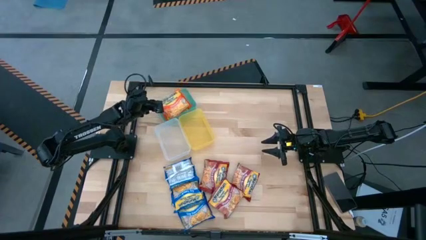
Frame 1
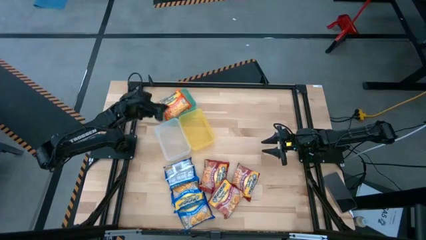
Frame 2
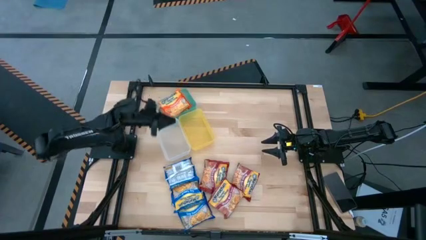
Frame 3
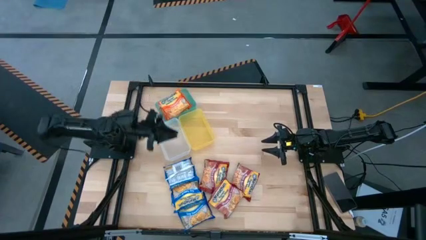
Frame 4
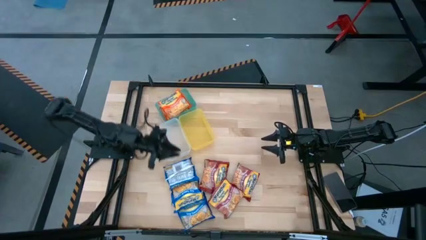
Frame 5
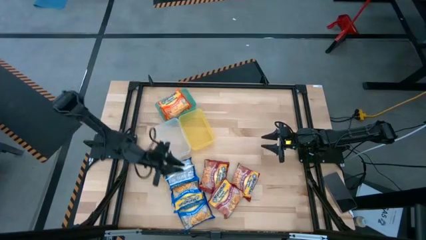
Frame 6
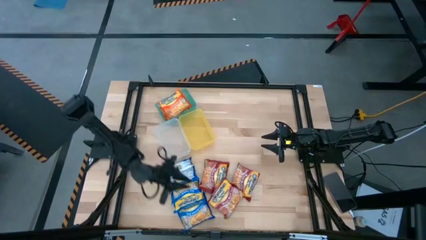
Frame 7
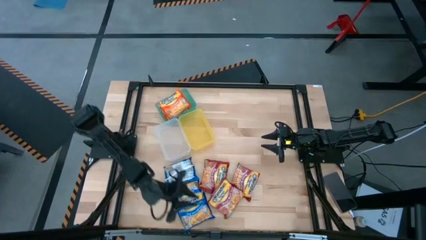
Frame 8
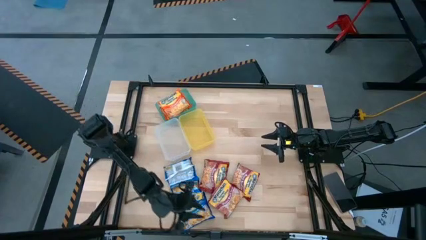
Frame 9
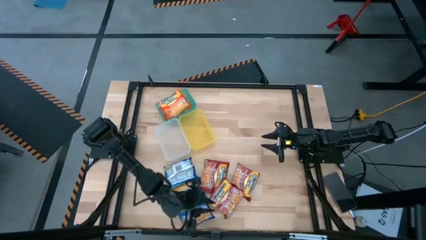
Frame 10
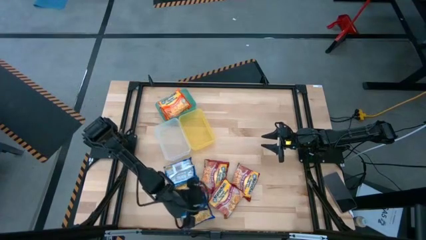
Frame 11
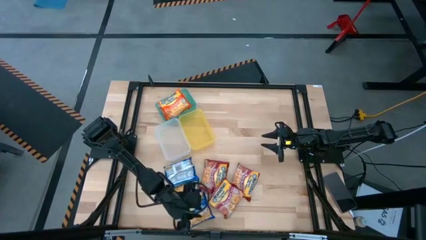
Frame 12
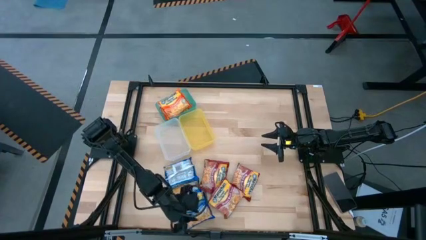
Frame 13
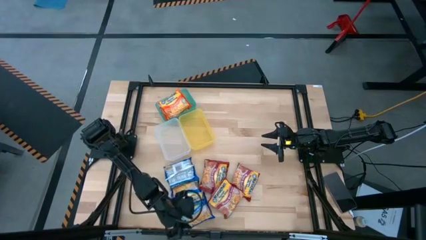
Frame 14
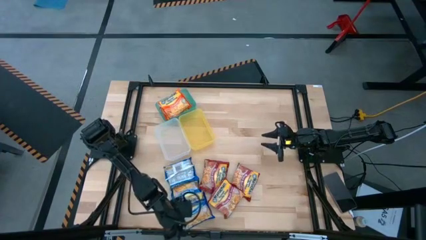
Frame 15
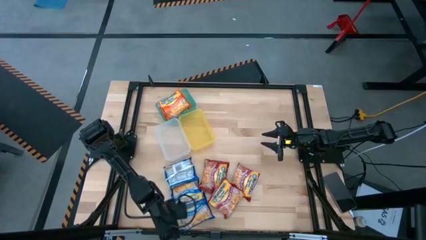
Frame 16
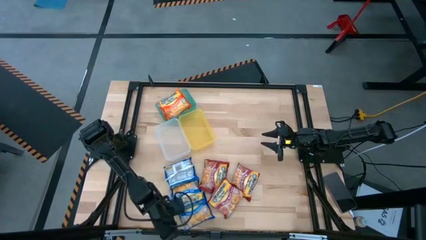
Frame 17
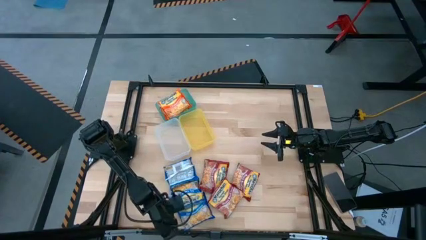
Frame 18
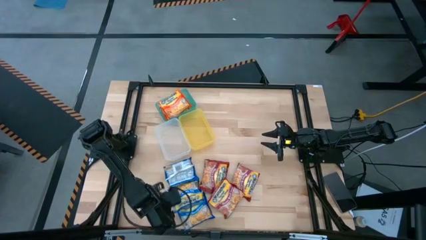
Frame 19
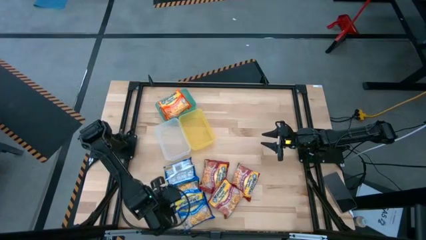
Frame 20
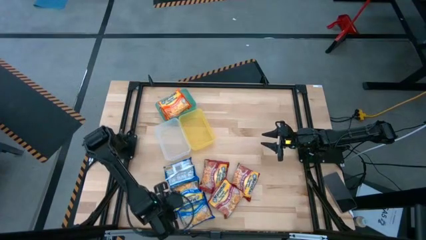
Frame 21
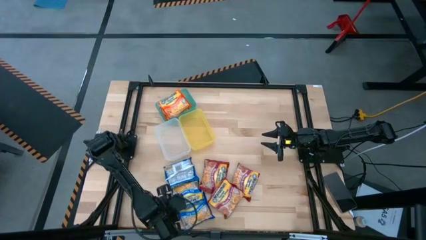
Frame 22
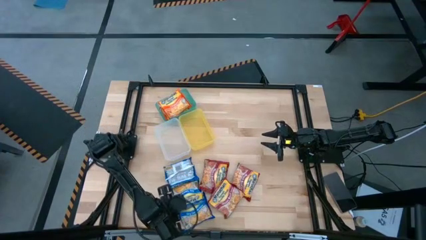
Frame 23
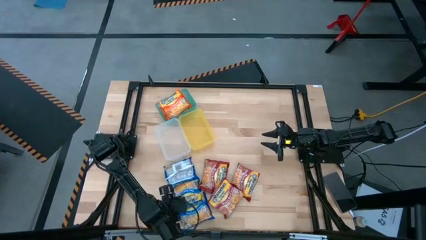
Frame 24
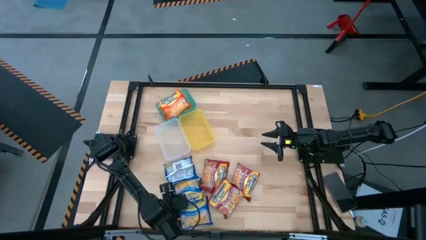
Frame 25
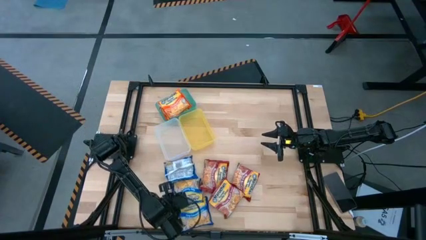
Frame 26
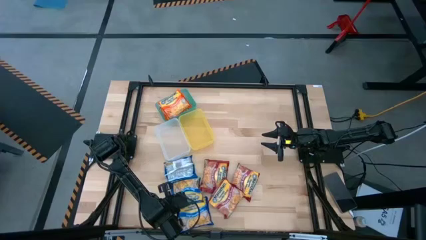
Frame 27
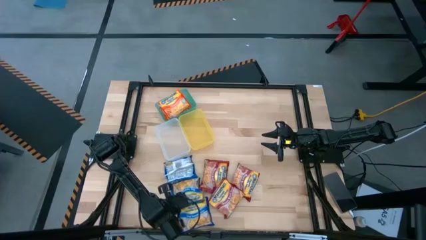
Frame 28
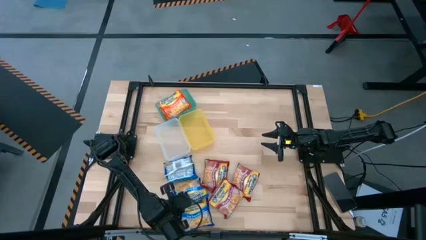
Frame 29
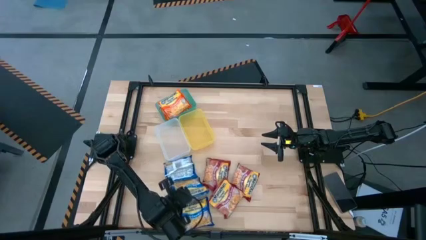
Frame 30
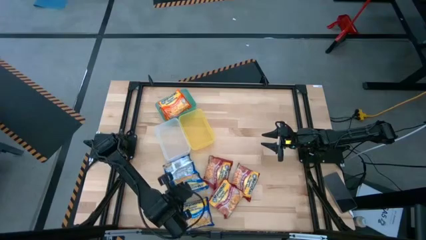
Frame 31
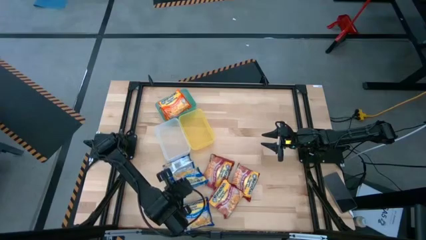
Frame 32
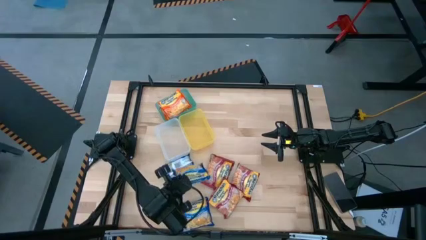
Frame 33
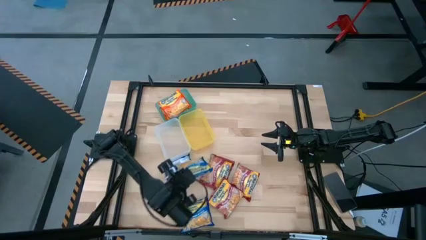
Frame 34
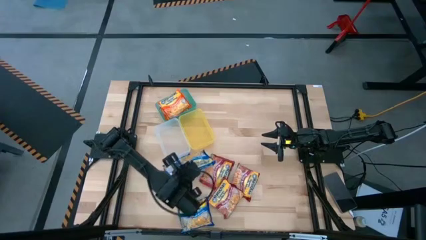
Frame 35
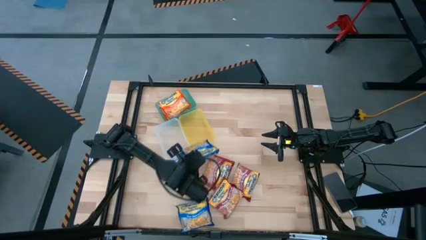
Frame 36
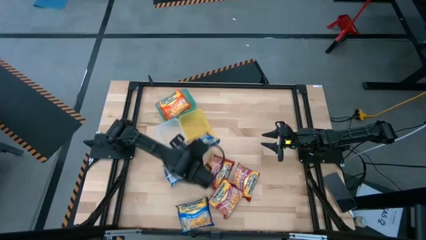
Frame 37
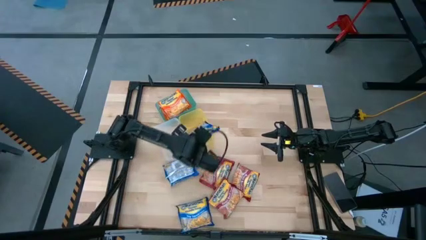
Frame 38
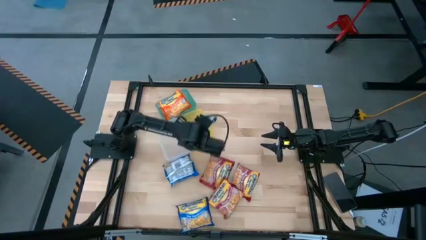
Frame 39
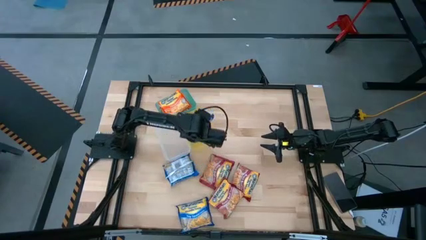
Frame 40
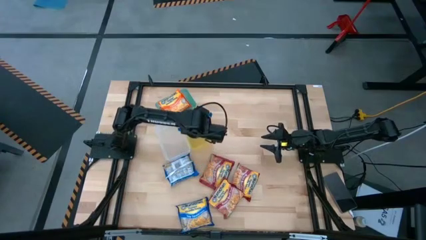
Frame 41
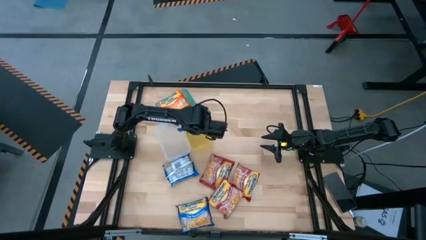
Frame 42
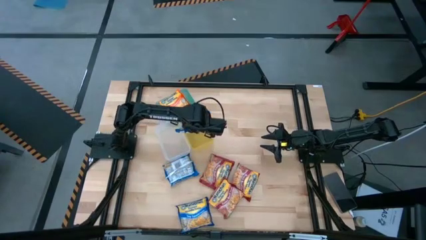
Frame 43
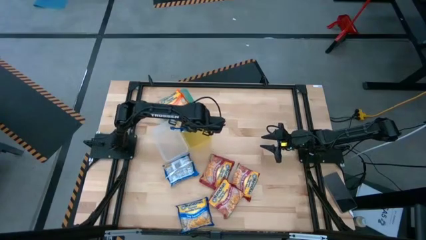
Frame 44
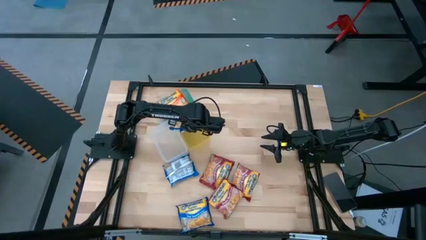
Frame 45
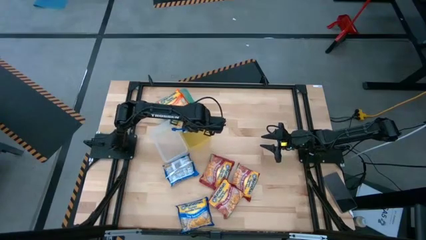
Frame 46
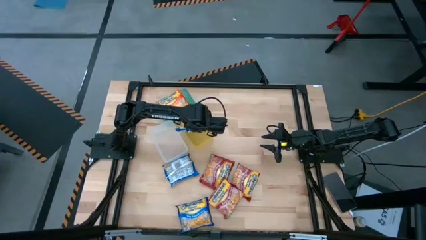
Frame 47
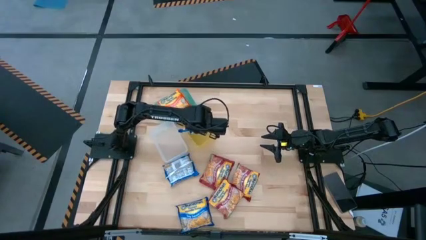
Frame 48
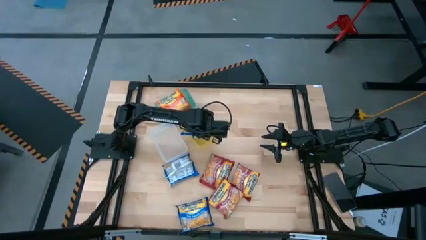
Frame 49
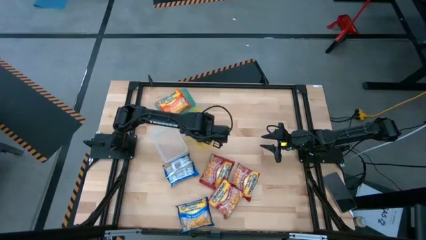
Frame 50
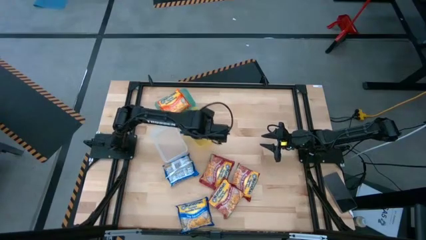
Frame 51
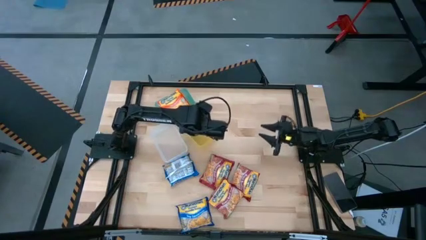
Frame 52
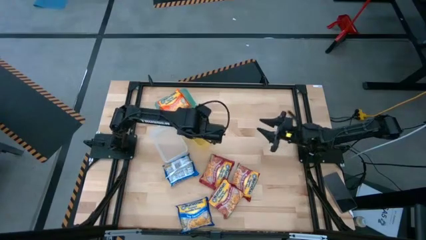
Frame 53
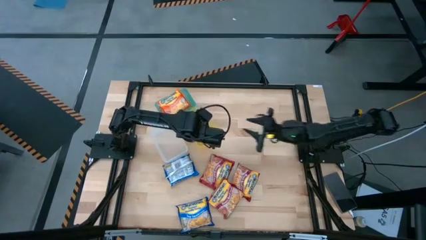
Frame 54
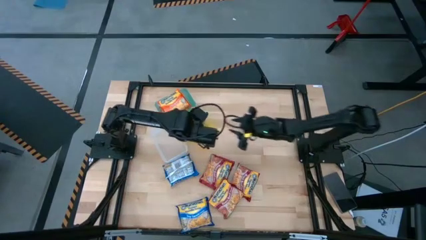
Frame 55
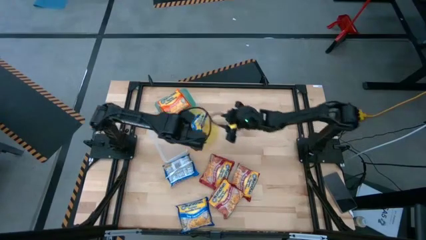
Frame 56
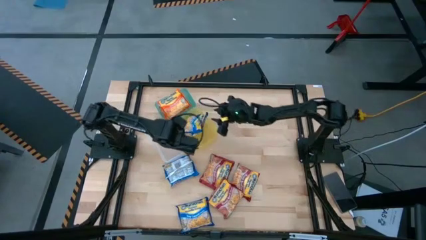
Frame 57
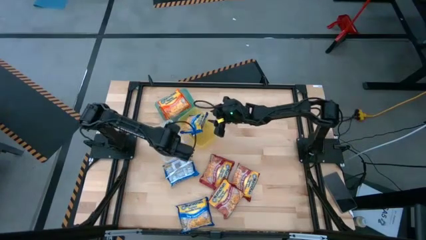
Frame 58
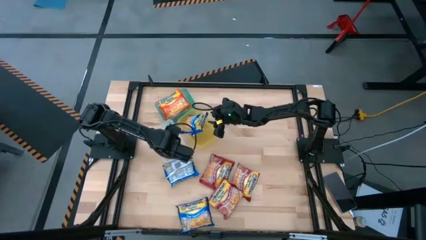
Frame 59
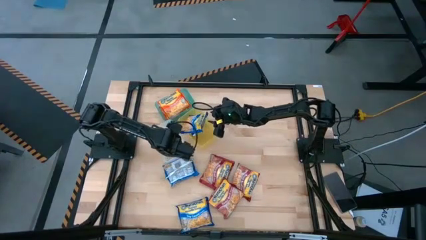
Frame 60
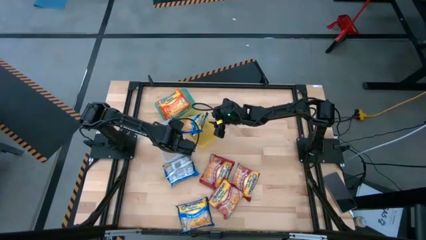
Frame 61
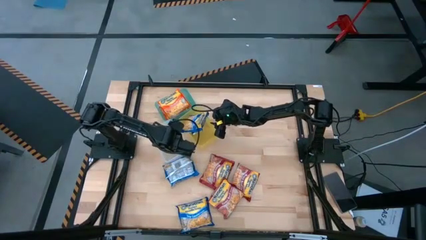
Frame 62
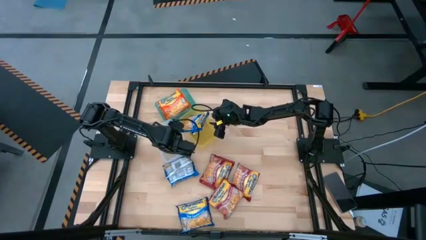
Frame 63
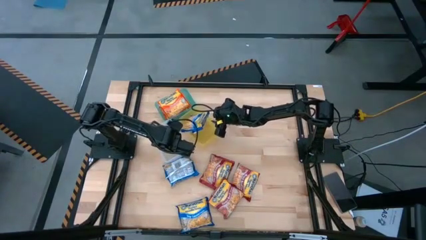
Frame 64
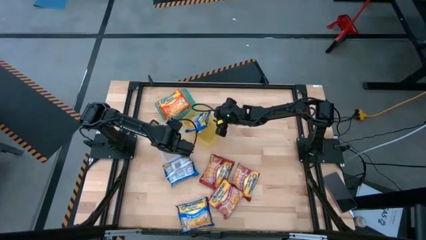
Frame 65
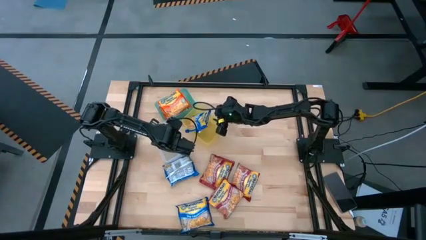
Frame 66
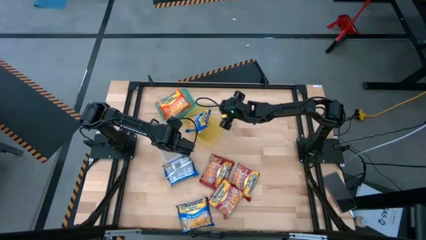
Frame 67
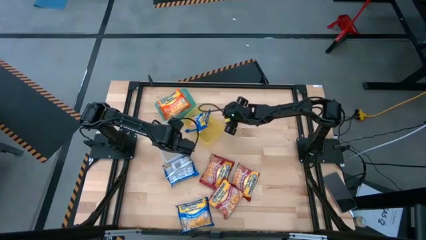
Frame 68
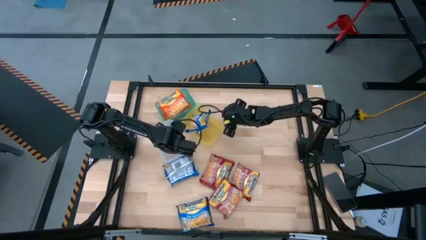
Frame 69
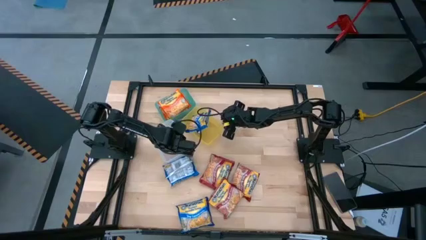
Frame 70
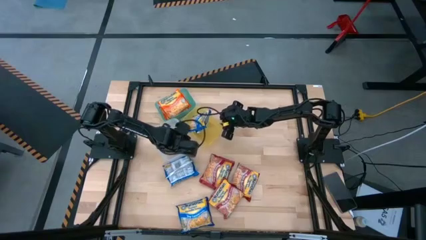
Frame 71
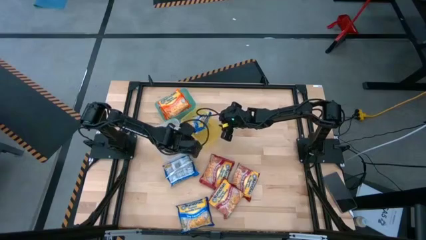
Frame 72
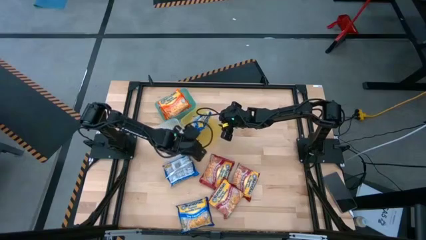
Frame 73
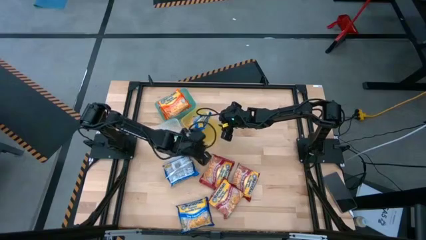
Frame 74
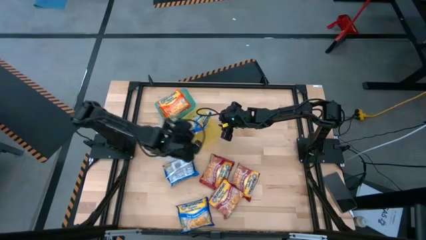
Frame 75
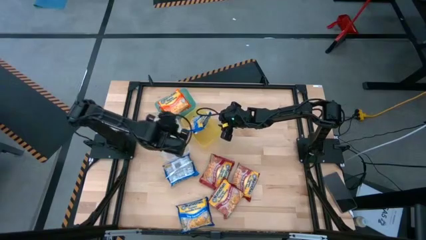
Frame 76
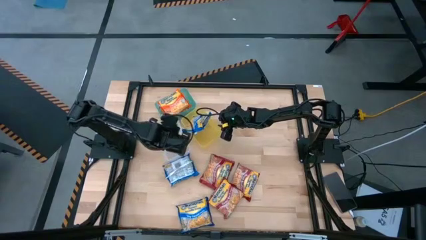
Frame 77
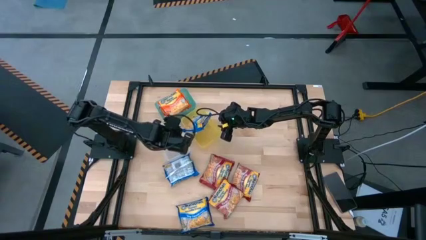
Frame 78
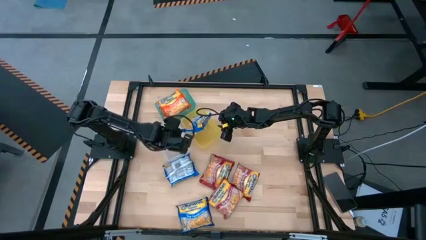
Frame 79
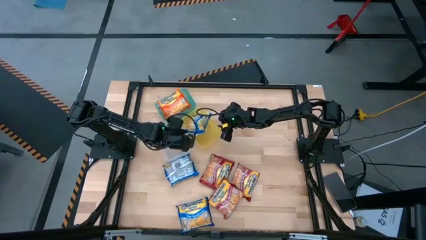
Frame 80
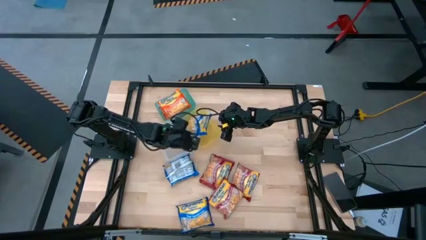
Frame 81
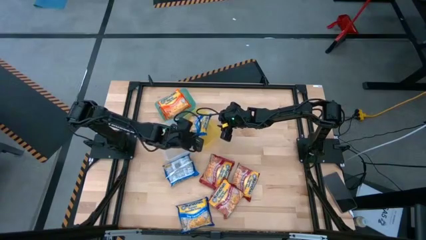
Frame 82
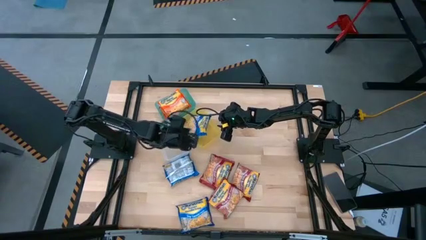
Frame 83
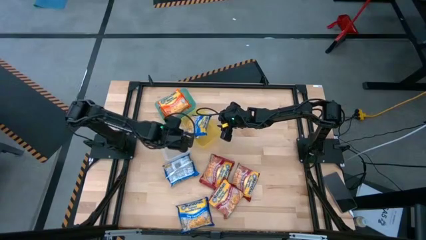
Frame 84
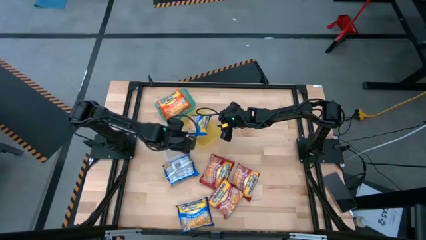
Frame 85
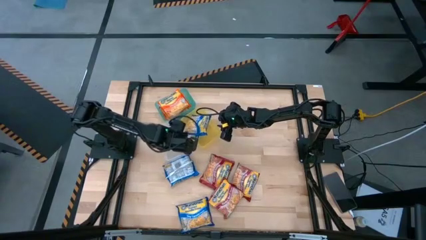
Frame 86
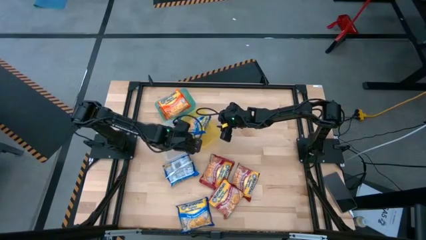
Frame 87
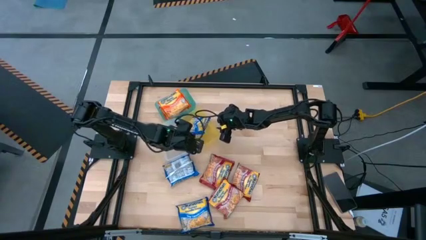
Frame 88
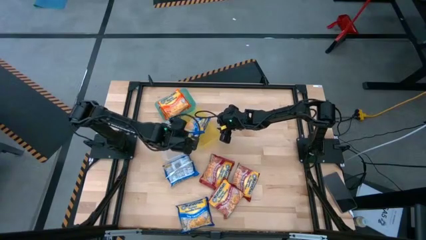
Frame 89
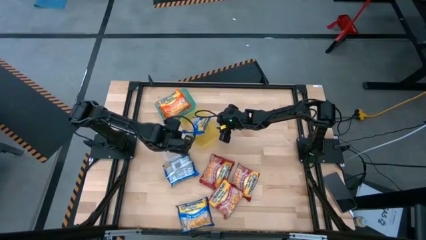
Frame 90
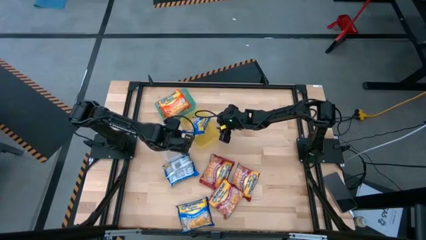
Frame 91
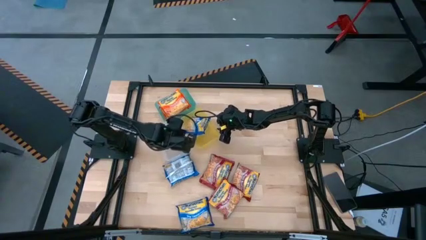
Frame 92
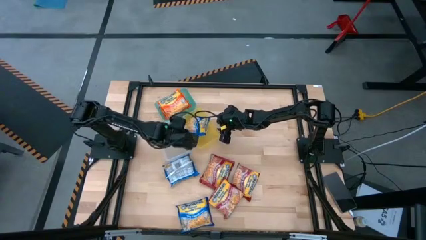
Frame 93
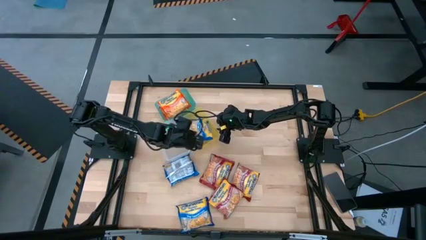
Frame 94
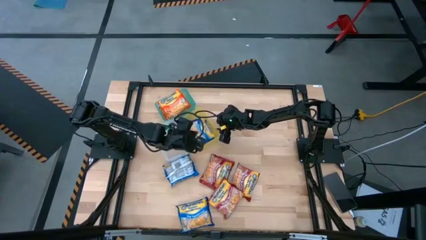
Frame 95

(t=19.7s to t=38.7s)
Task: Sort Maruchan noodles
Put the bottom blue noodle pack into the yellow bin
